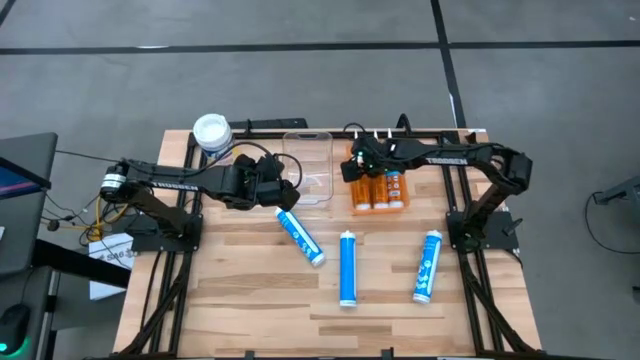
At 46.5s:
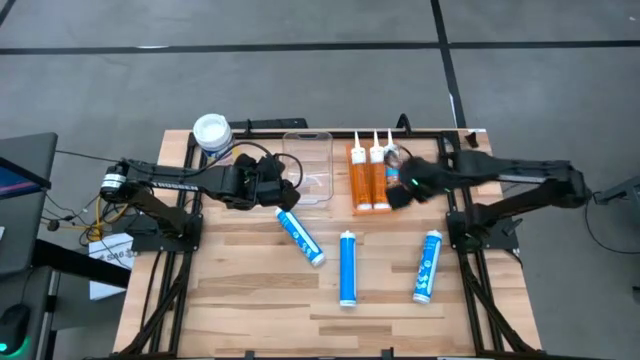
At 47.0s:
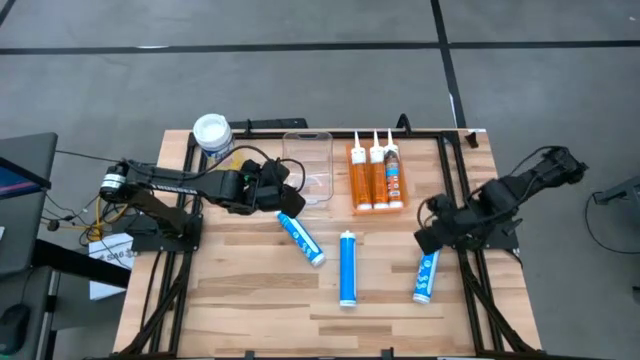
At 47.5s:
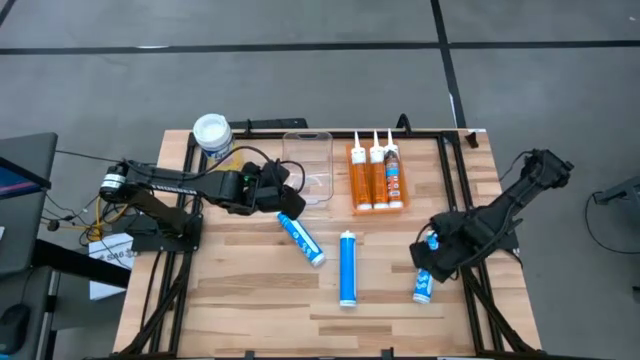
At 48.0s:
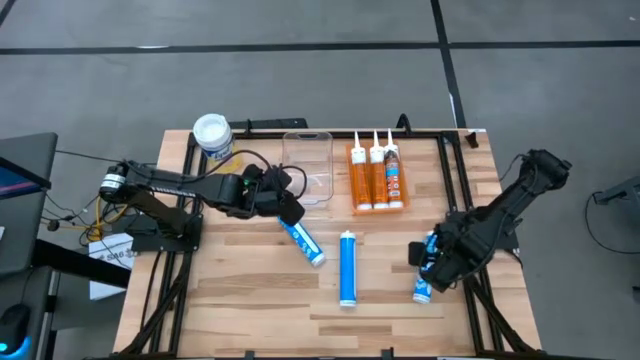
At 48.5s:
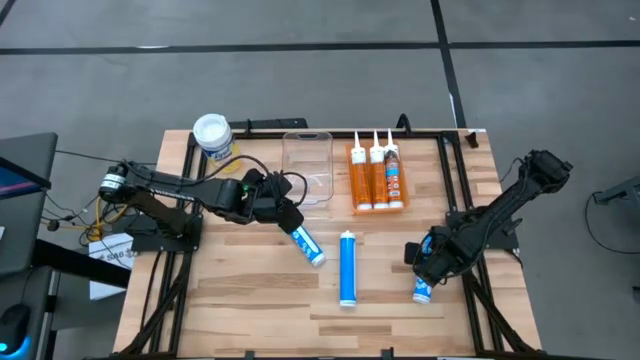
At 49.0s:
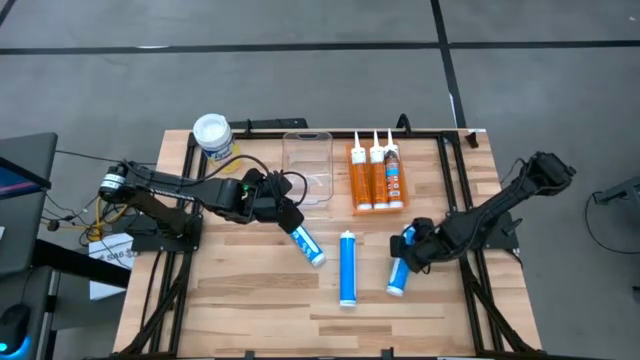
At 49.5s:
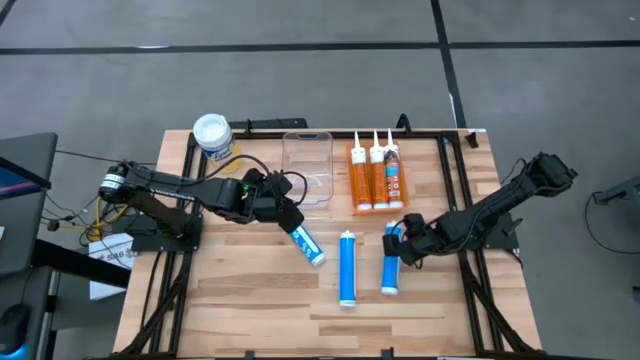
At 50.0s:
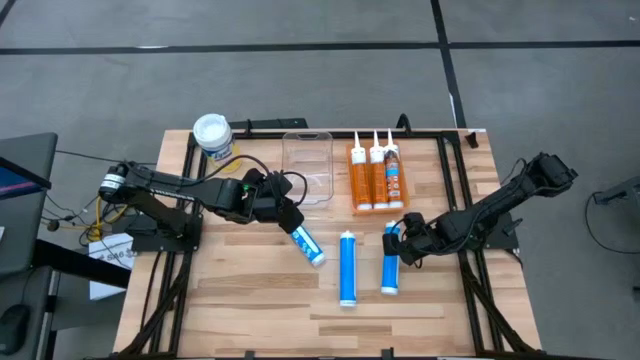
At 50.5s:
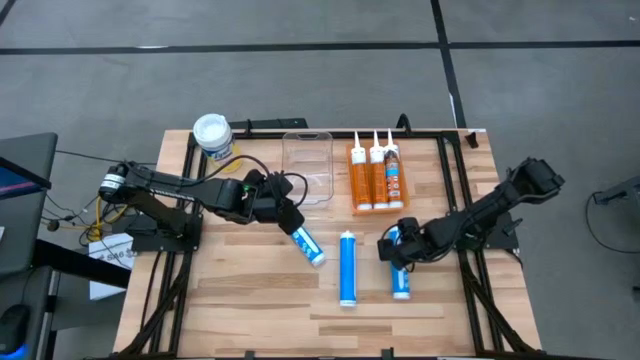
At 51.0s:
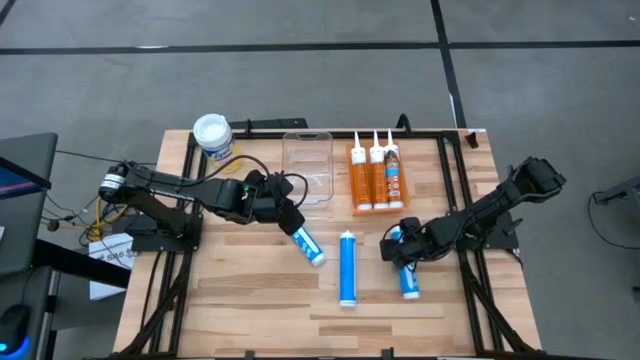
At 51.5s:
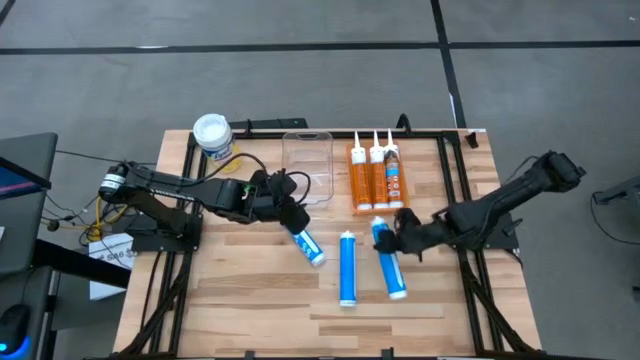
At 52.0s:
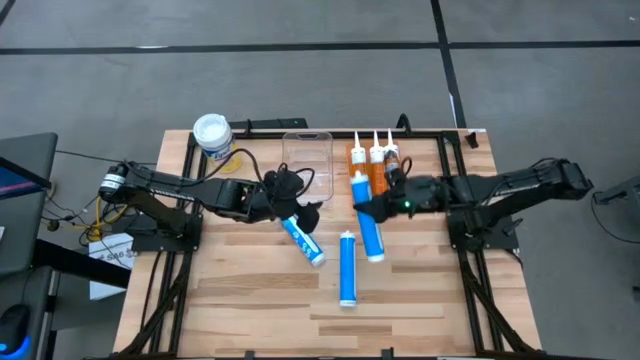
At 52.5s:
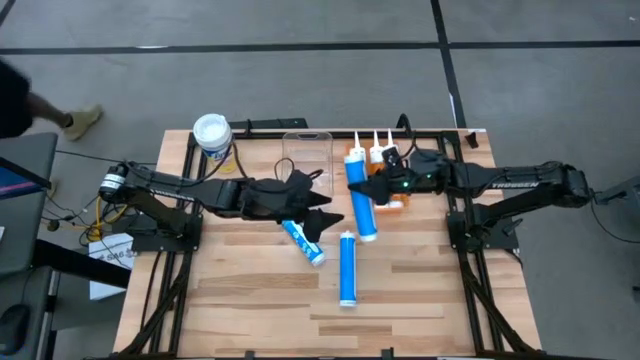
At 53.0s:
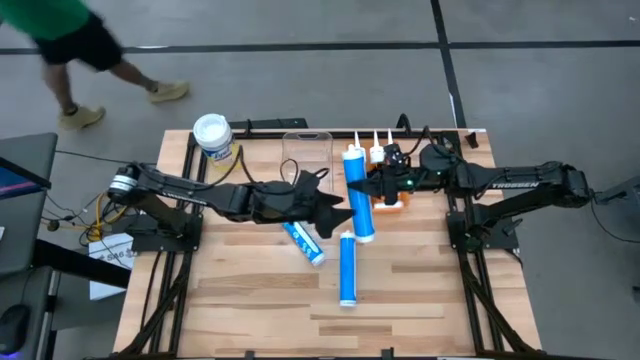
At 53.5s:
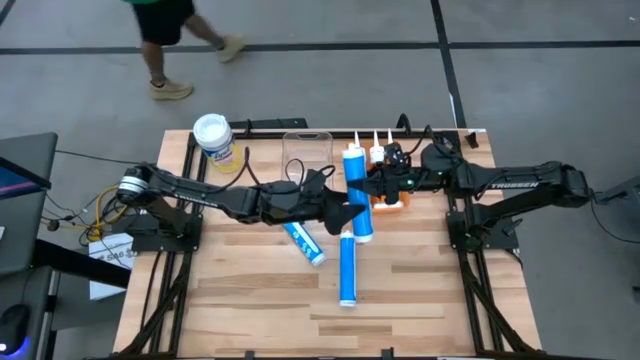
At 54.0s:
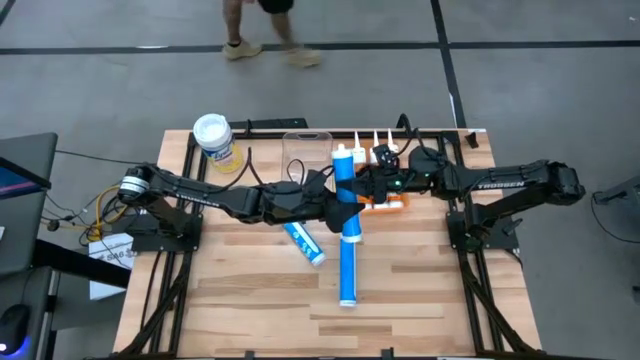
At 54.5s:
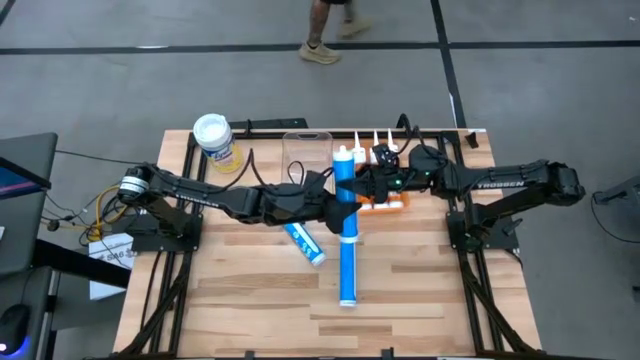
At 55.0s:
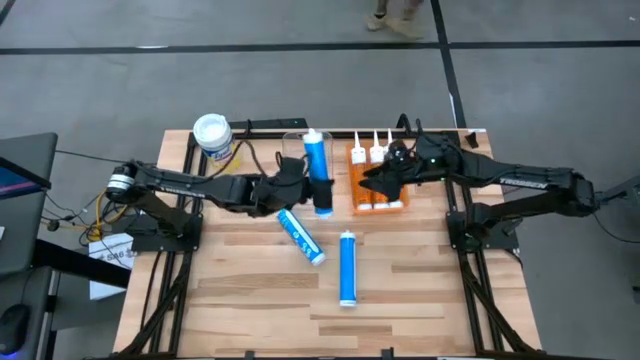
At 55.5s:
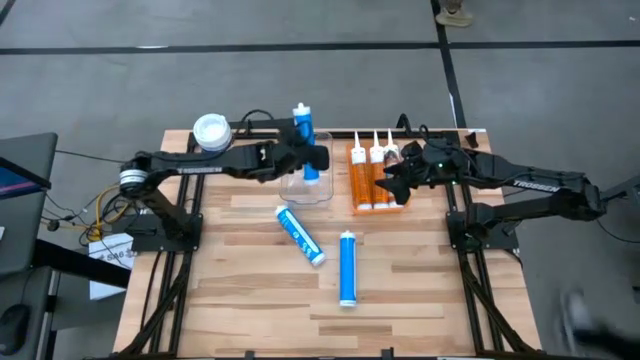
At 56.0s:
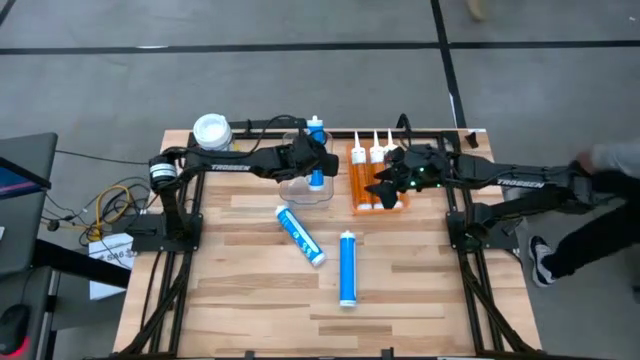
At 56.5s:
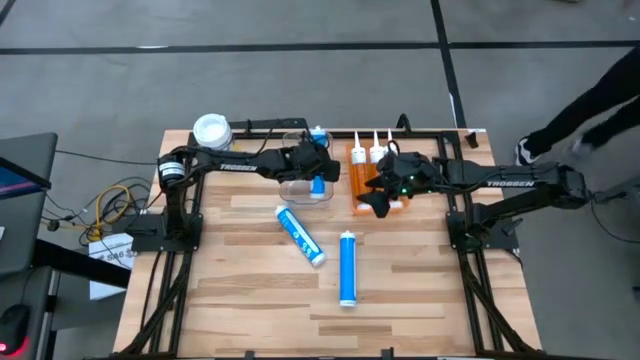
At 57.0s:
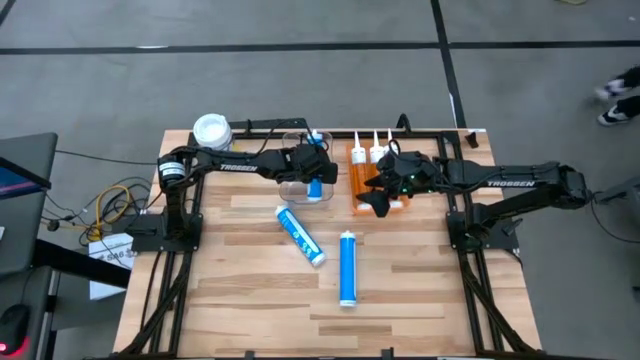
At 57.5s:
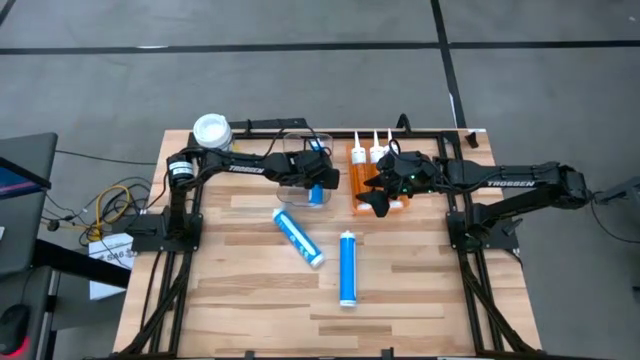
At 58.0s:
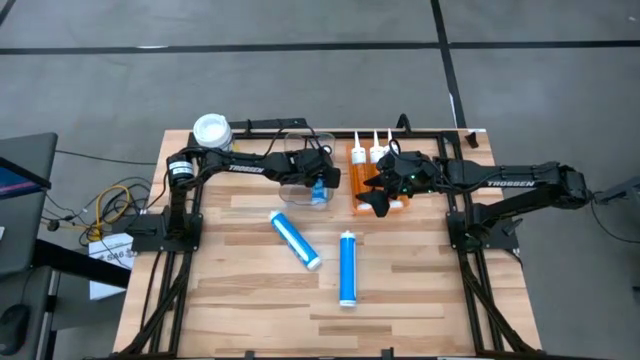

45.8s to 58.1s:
Task: Pick & place silicon tubes, Sealant and Lysol wipes
Put the right blue sealant into the transparent bin

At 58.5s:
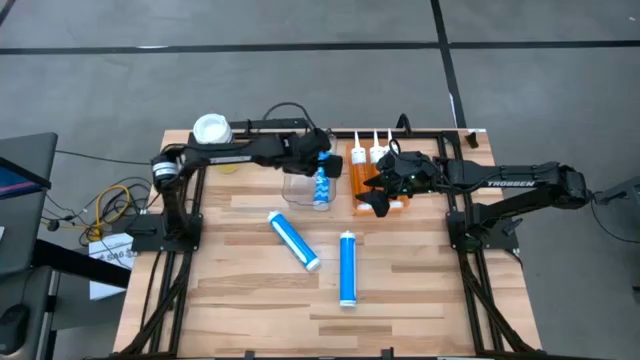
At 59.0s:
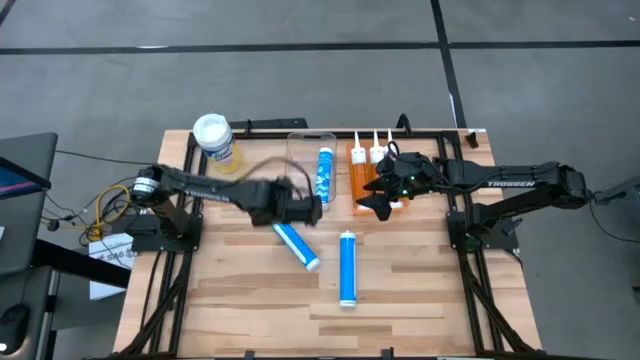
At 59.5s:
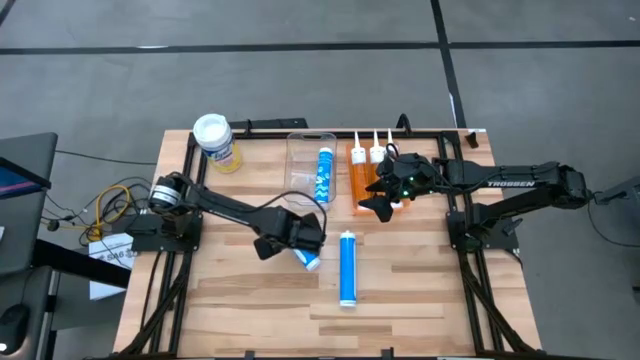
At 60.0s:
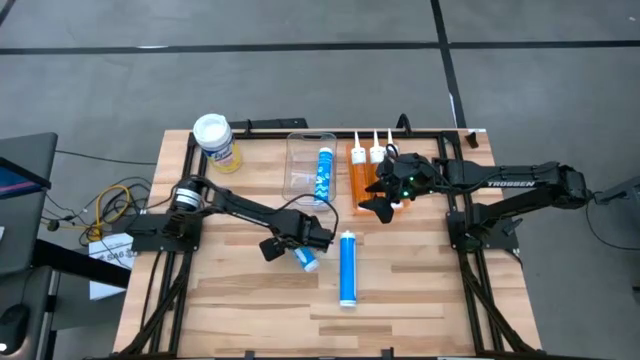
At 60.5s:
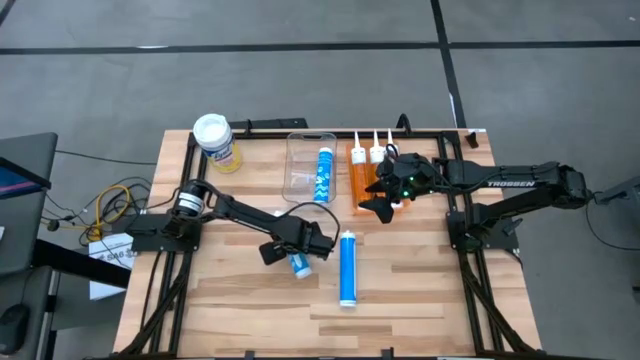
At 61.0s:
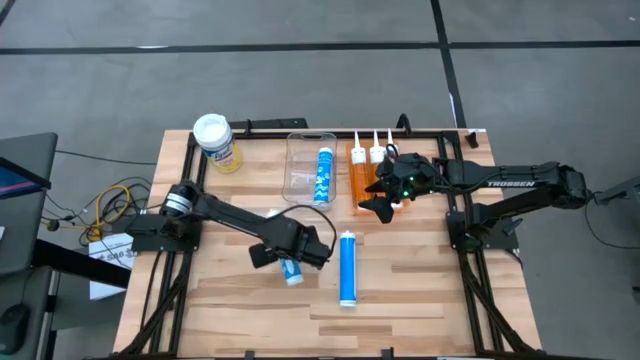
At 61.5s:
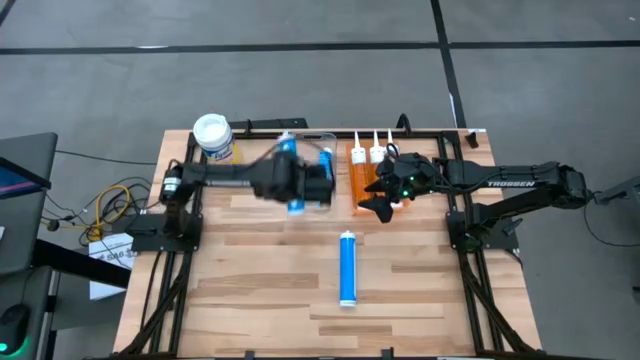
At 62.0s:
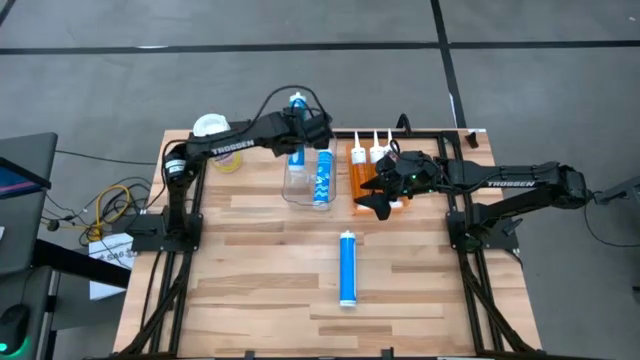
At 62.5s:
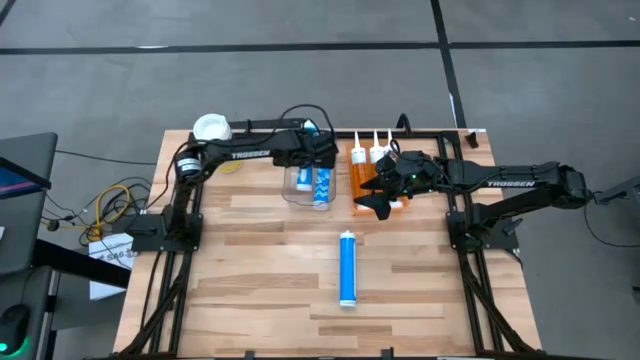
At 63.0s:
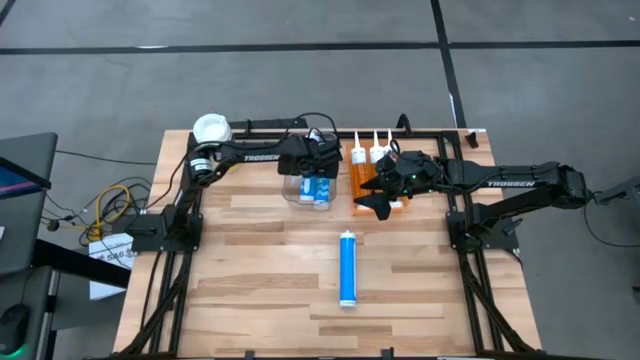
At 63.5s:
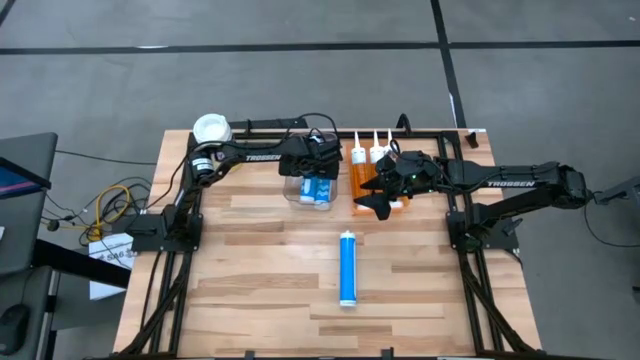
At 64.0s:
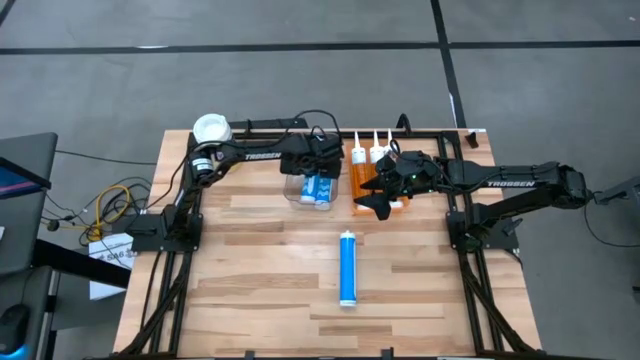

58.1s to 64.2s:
Put the left blue sealant into the transparent bin

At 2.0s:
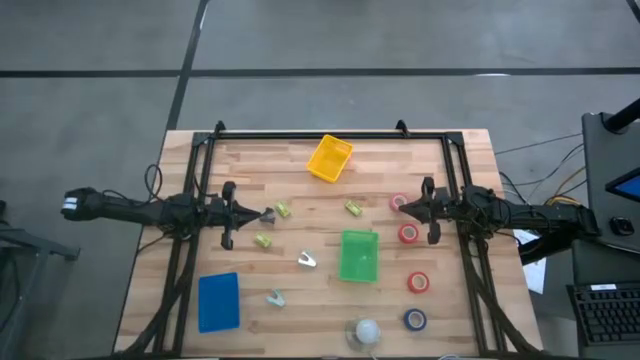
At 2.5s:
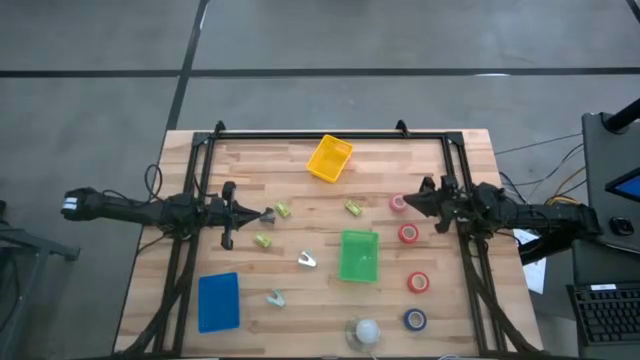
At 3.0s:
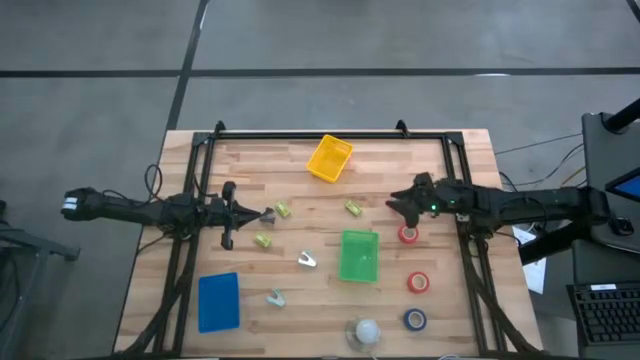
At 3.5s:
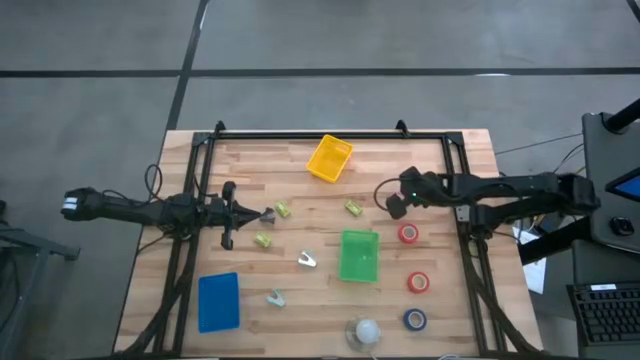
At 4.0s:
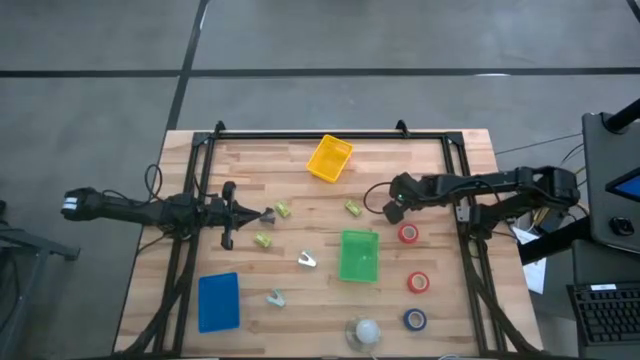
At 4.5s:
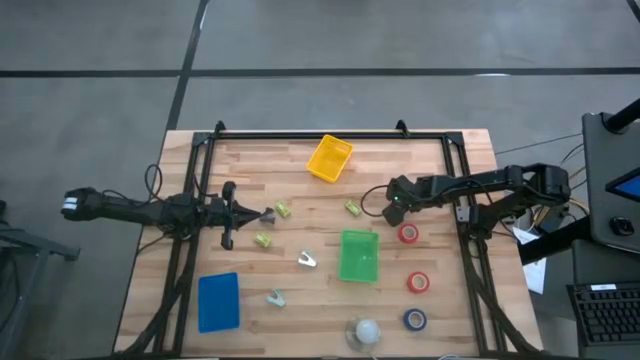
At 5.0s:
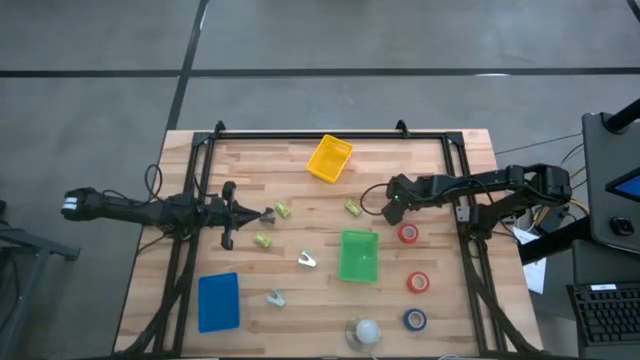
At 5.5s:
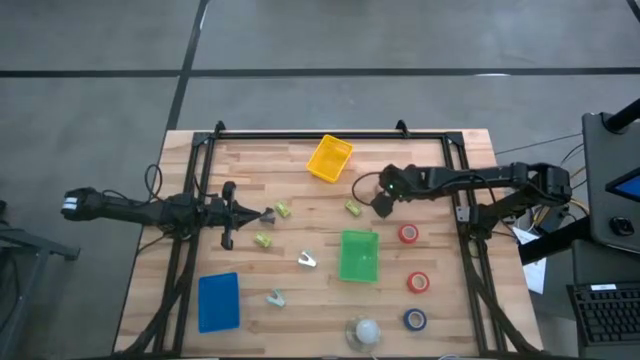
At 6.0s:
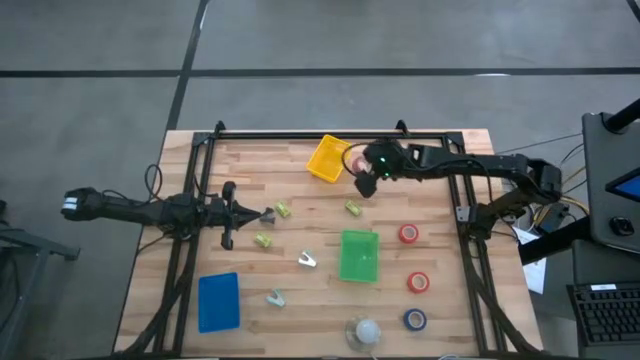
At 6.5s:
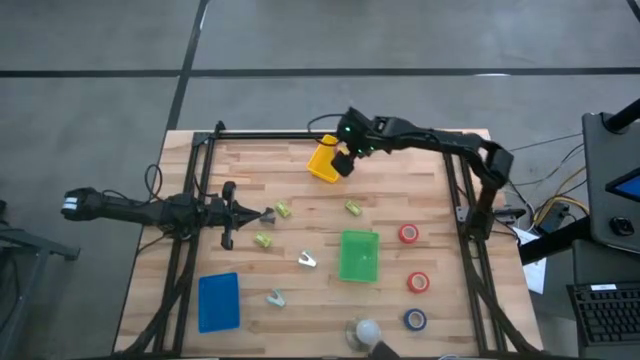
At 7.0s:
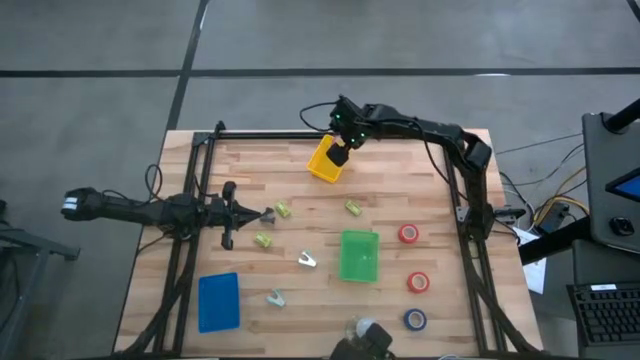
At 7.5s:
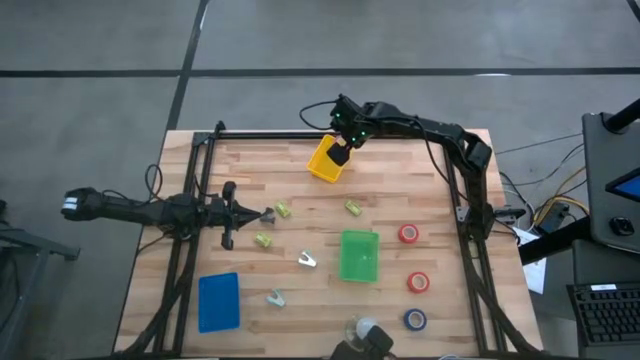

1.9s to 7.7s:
Task: Pick and place Stapler, Stapler remover, tape
Put the pink tape into the yellow bin
